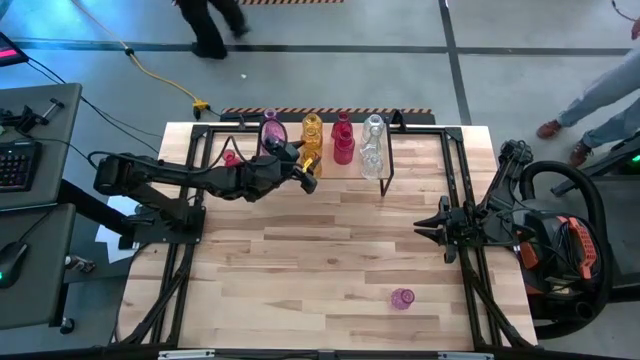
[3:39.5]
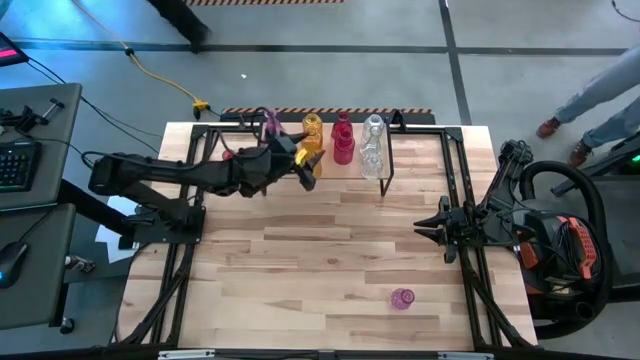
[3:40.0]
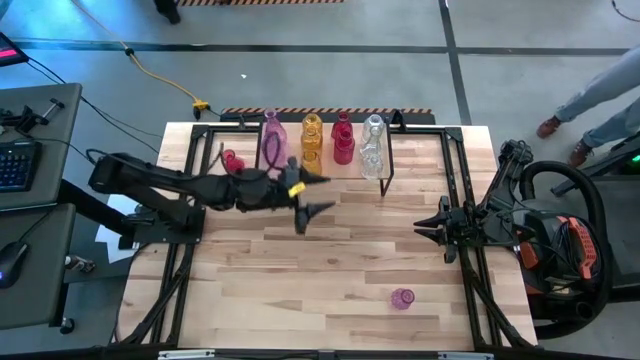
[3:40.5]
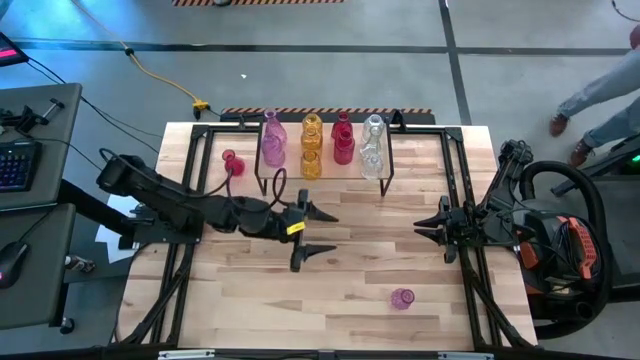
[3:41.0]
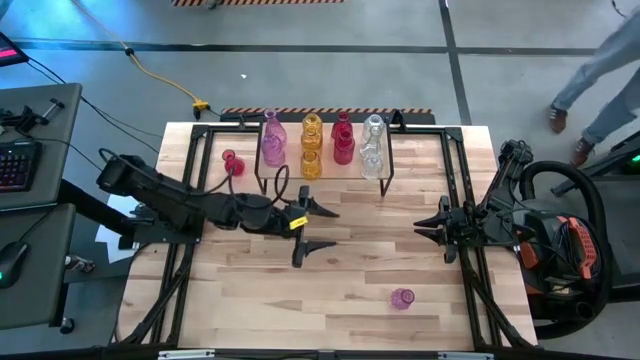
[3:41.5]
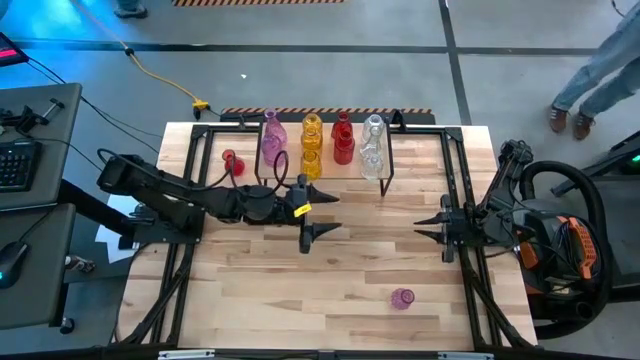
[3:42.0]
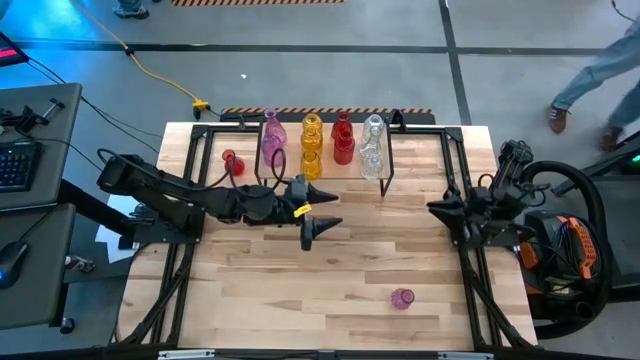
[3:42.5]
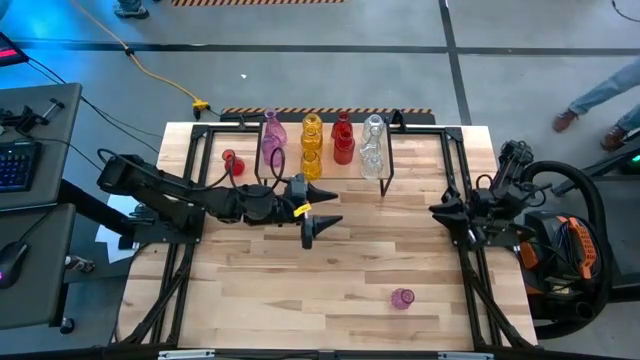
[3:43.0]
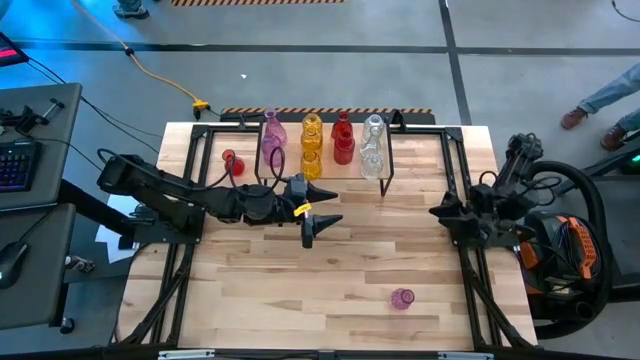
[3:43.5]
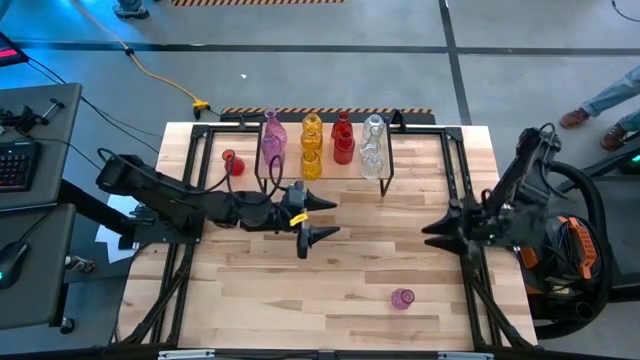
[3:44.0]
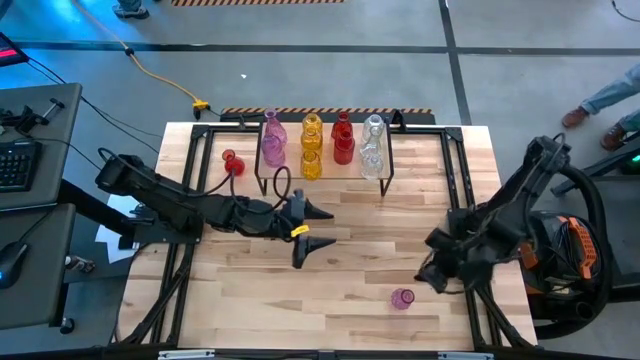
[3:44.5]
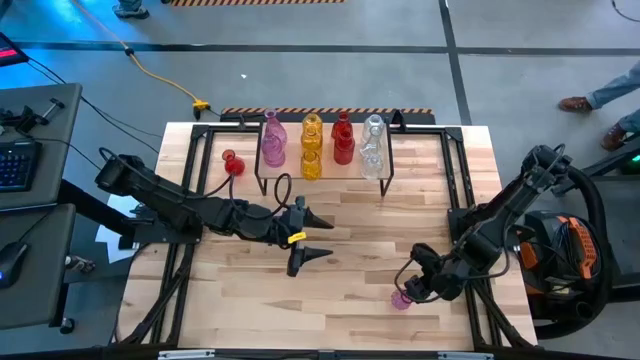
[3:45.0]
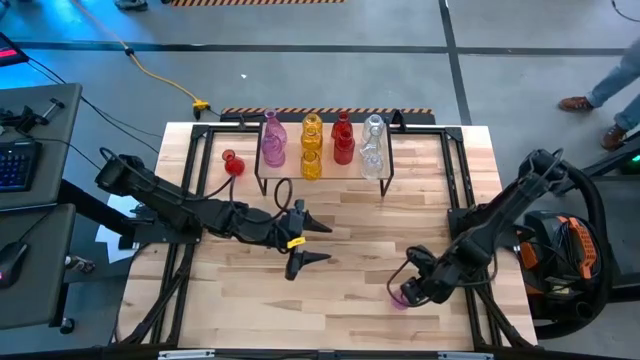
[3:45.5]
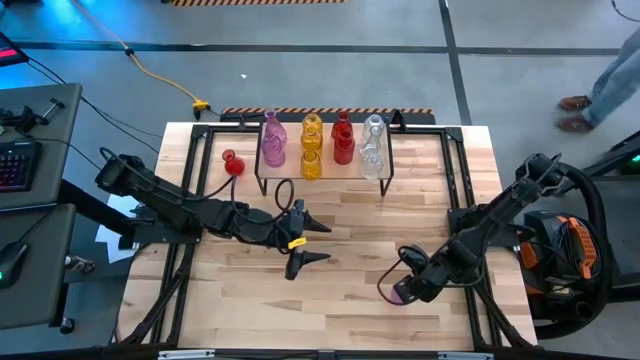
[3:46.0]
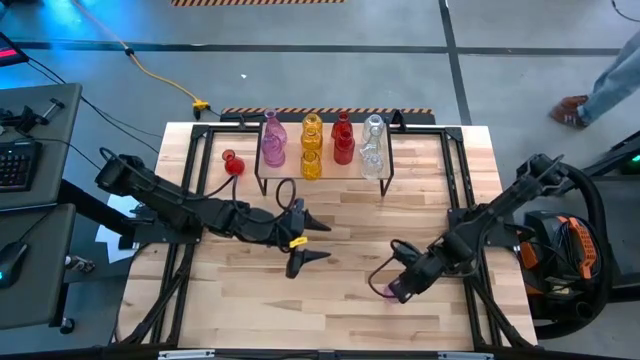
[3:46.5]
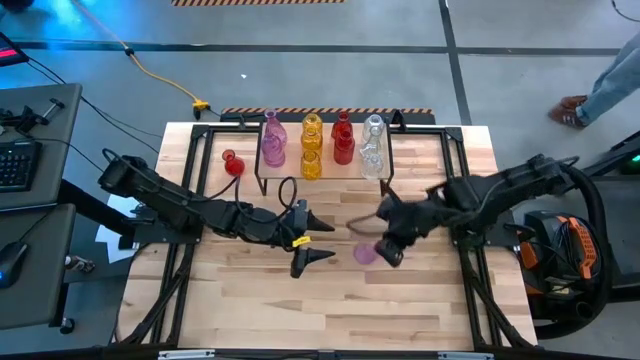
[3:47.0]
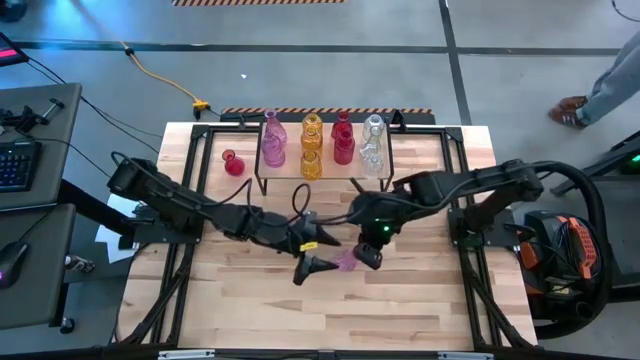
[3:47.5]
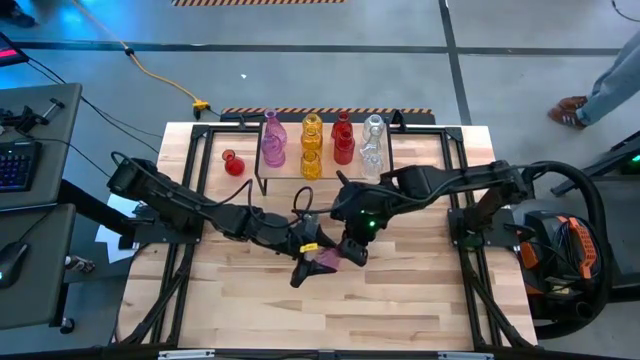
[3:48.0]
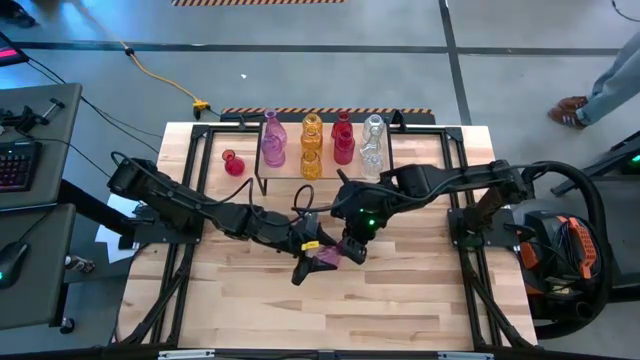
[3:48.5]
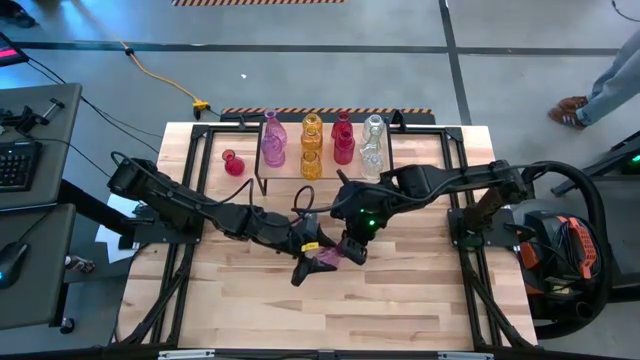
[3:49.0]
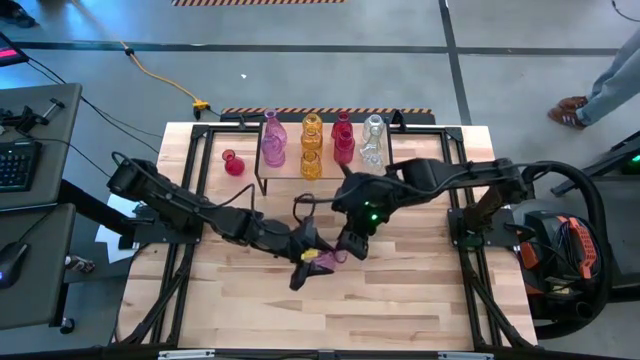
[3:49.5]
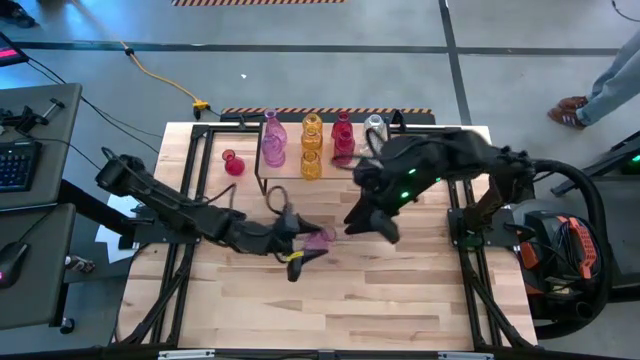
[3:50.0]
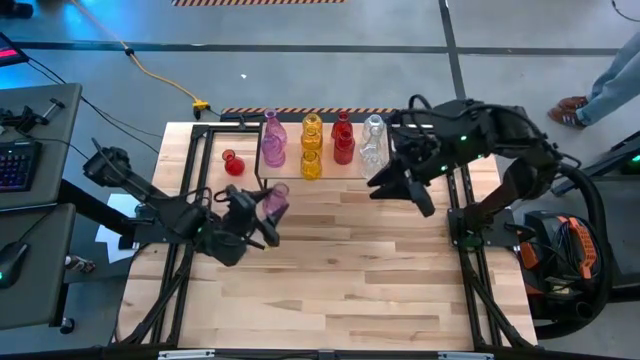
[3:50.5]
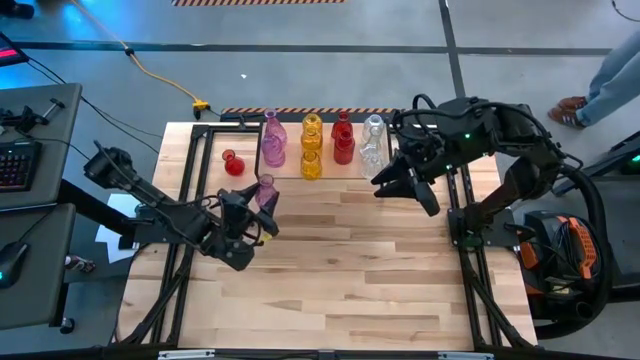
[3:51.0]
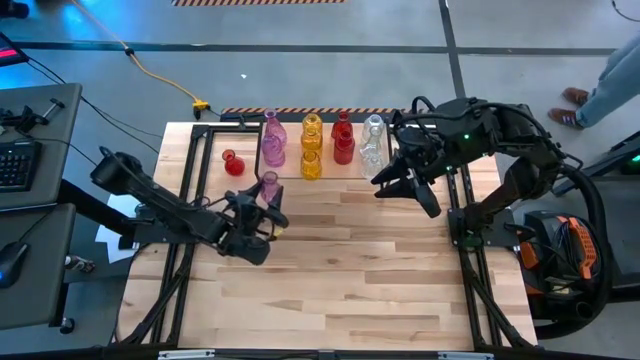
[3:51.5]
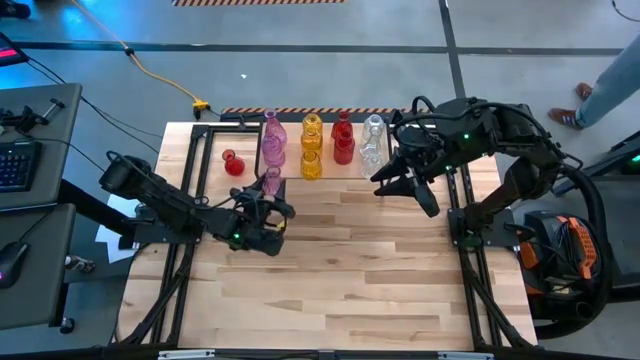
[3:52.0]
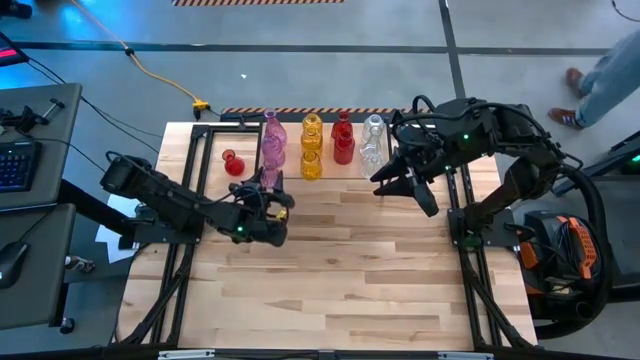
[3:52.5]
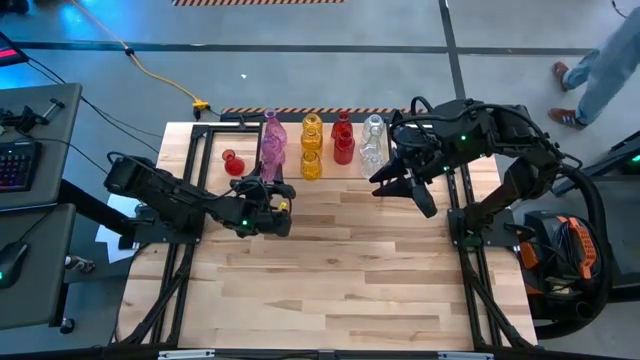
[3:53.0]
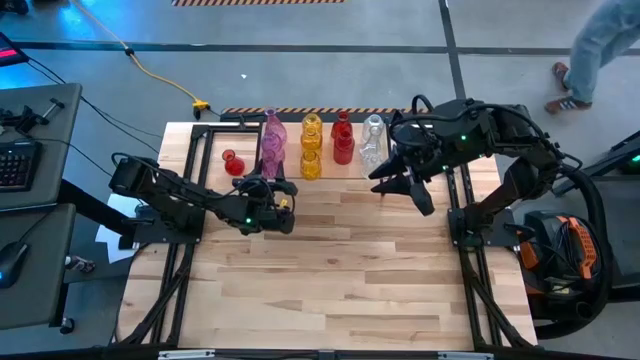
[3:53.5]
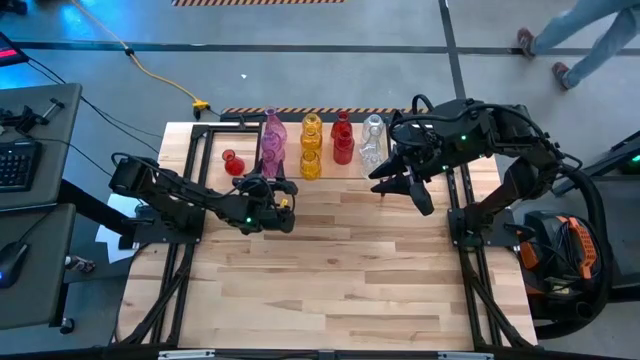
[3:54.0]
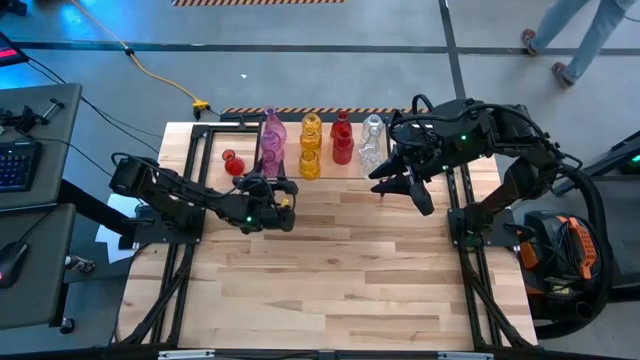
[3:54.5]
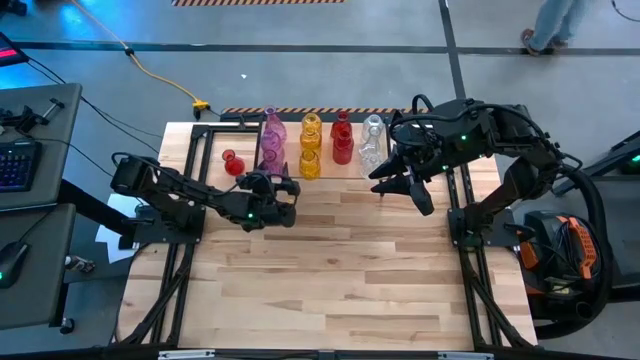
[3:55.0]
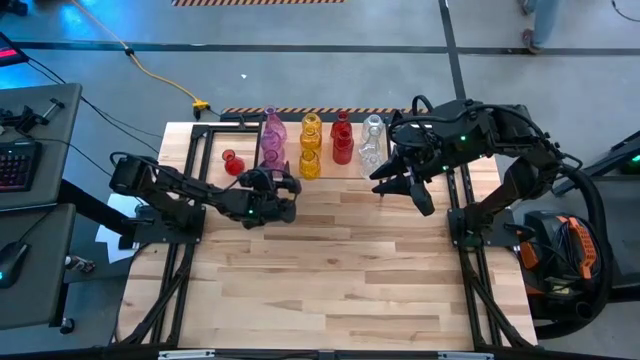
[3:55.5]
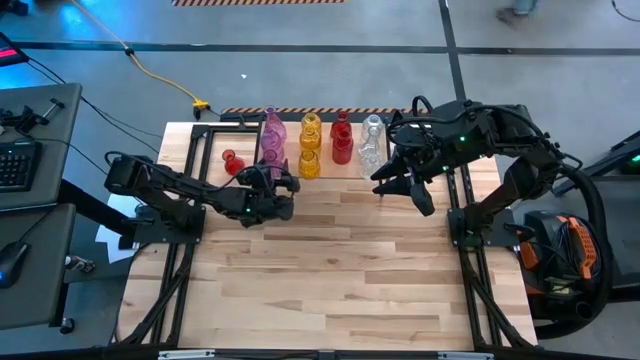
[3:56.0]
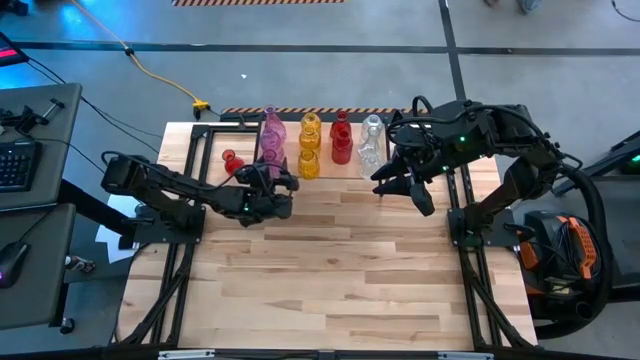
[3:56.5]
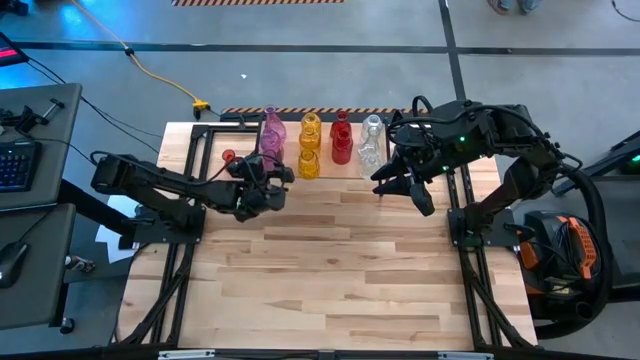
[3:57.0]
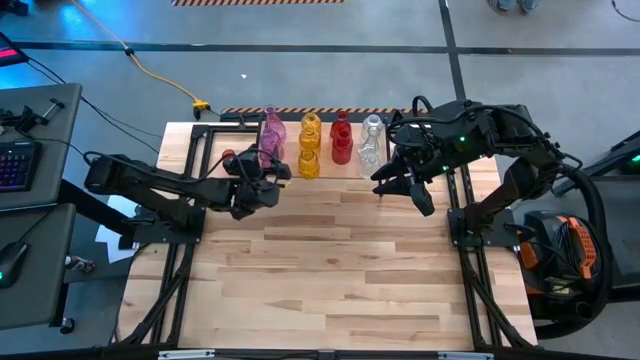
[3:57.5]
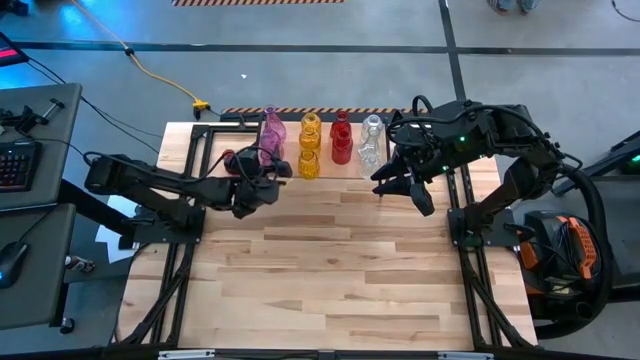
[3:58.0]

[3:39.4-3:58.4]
Task: sort vases onto shelf
Put the pink vase on the shelf aligned with the other pink vases

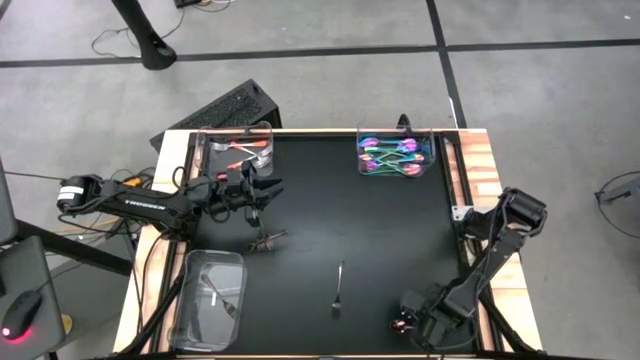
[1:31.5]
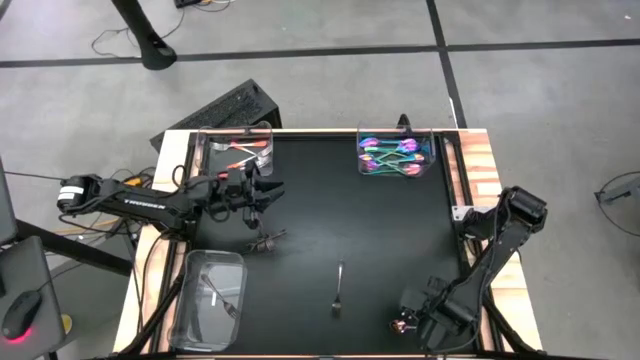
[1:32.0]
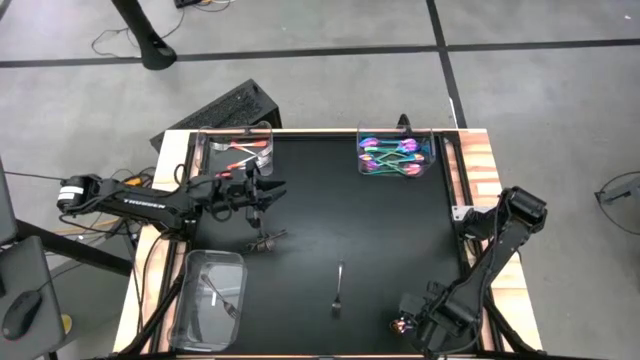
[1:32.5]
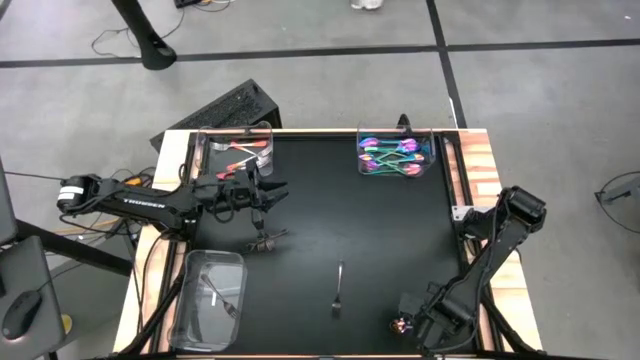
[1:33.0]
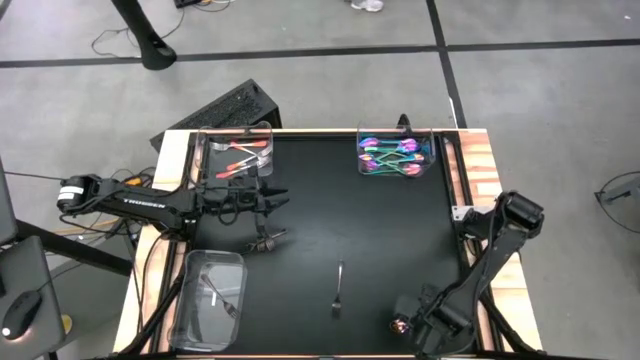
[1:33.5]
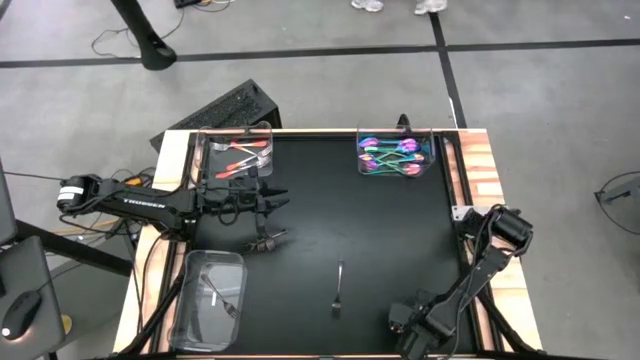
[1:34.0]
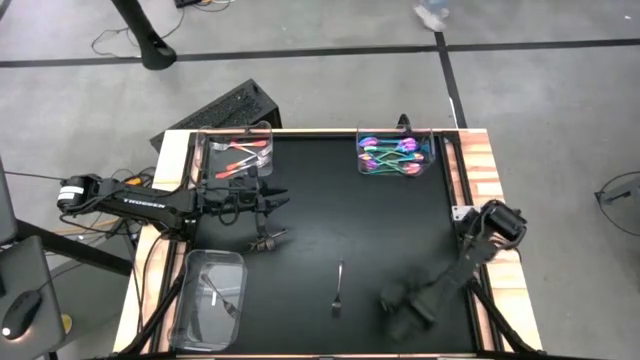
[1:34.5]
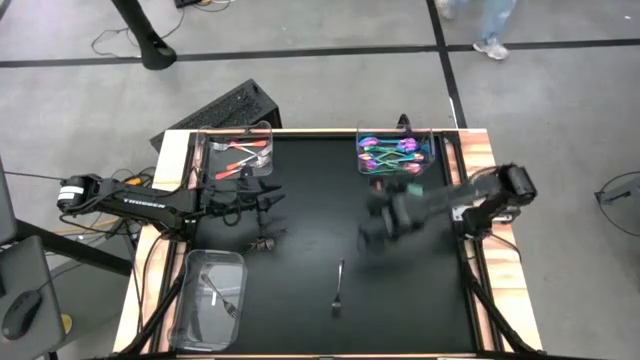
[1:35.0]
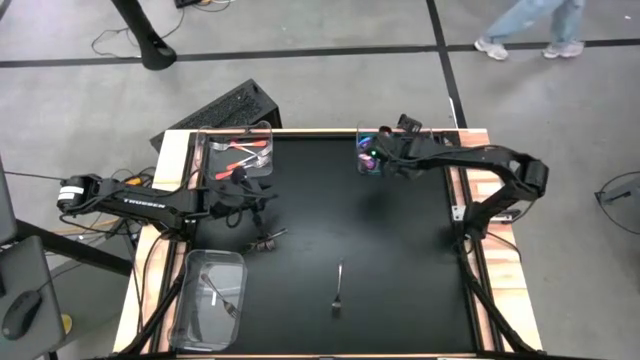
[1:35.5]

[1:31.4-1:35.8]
Task: Sort silverware by color (type)
Put the blue spoon into top right transparent bin
